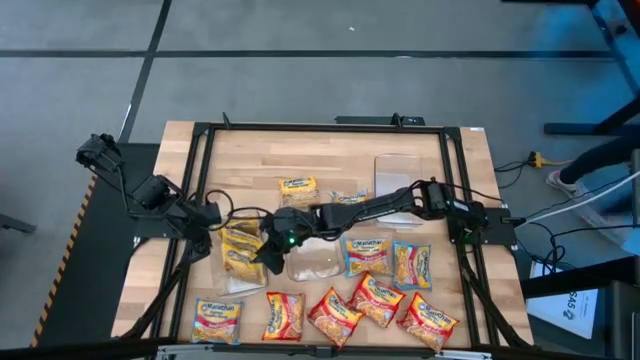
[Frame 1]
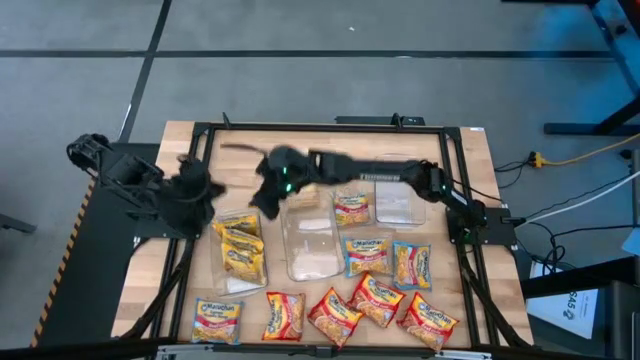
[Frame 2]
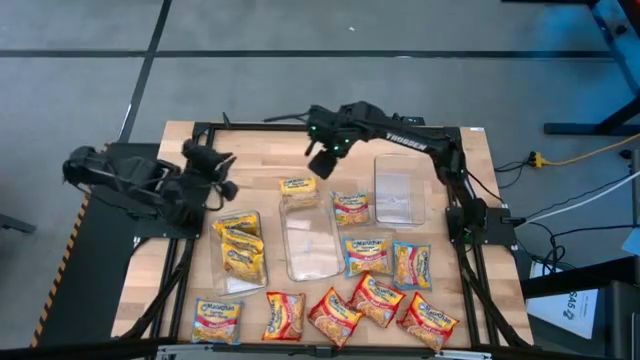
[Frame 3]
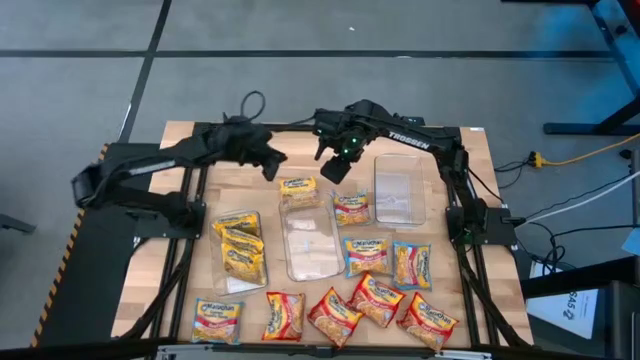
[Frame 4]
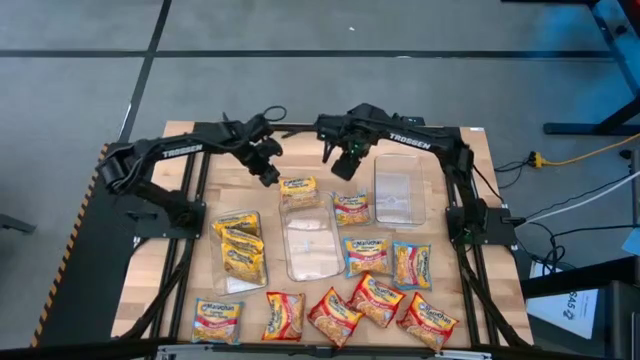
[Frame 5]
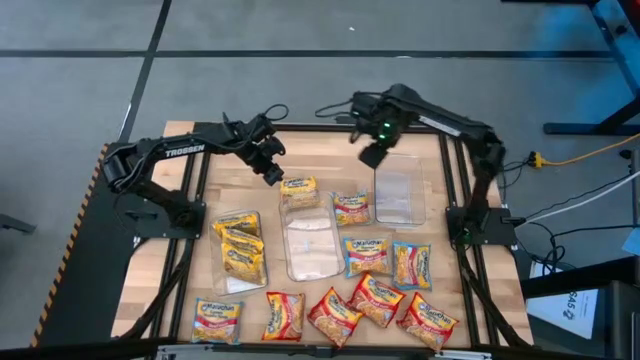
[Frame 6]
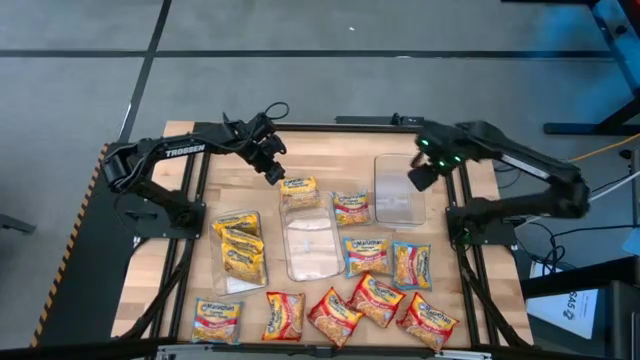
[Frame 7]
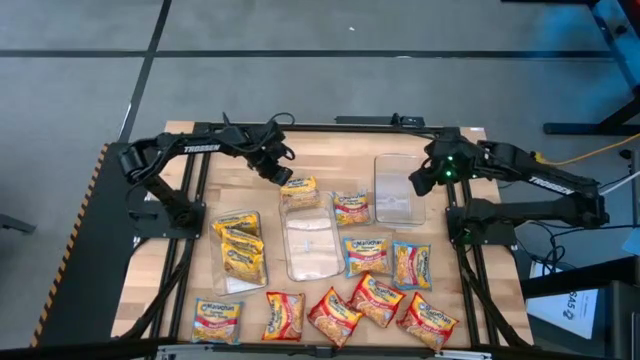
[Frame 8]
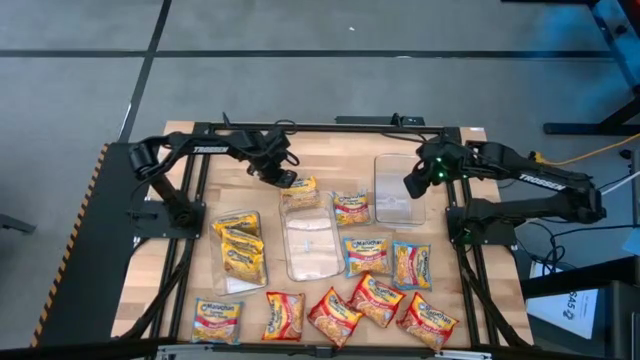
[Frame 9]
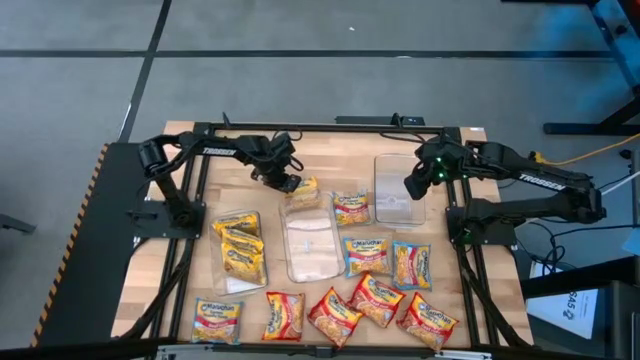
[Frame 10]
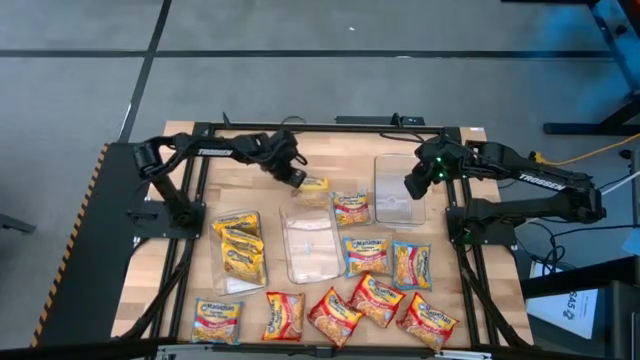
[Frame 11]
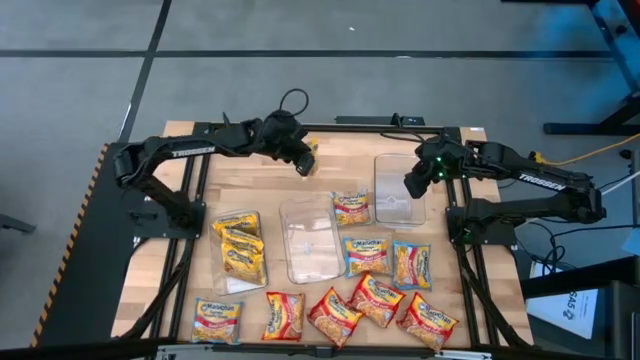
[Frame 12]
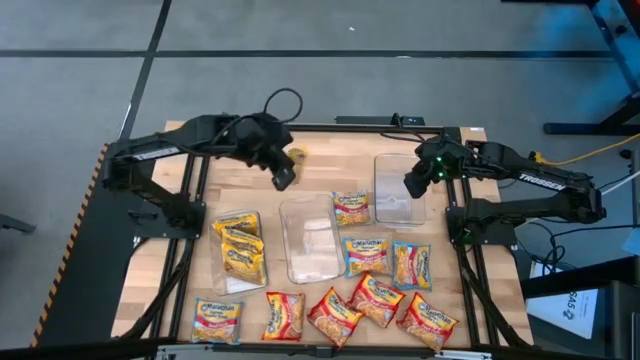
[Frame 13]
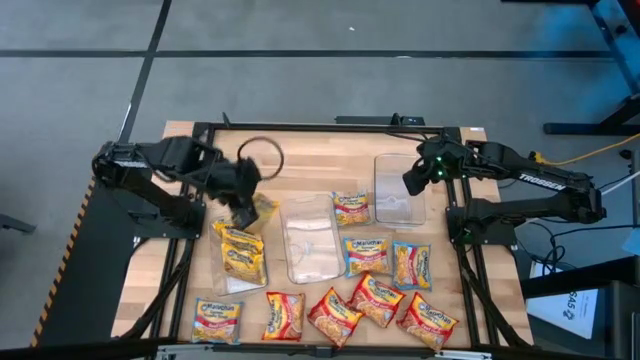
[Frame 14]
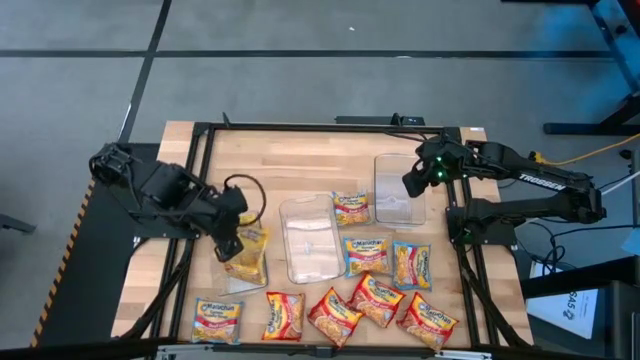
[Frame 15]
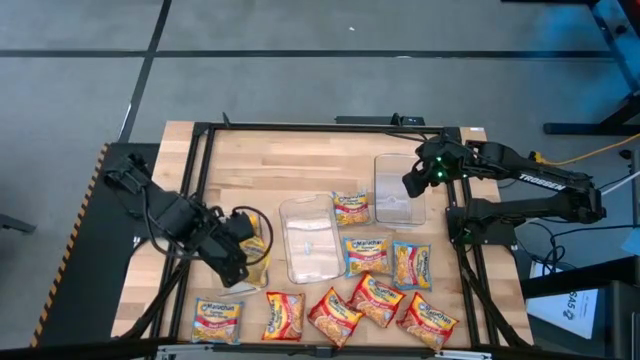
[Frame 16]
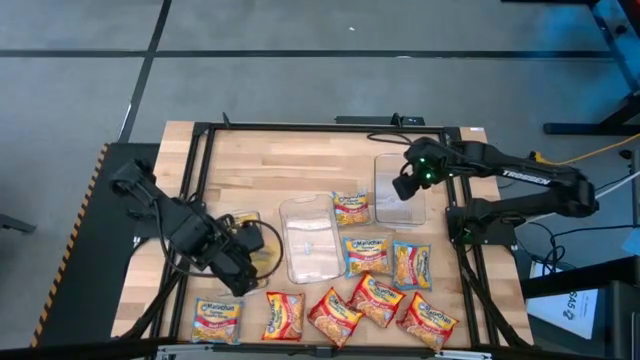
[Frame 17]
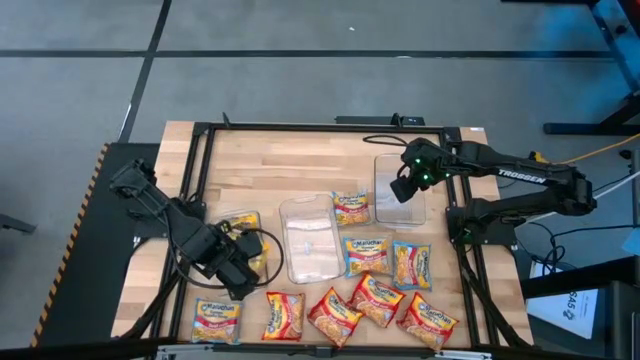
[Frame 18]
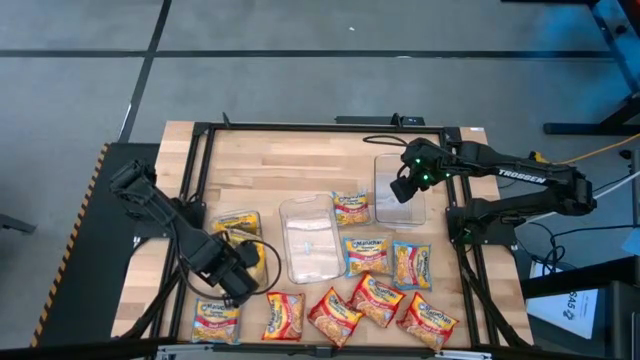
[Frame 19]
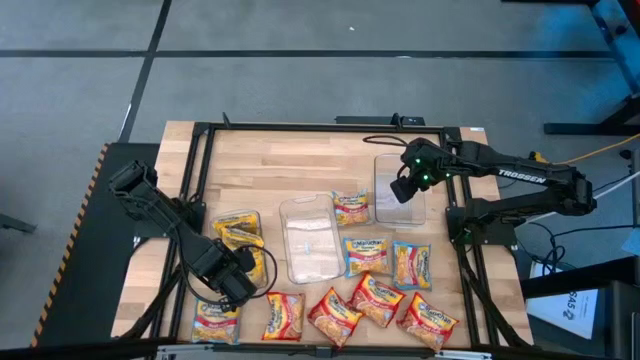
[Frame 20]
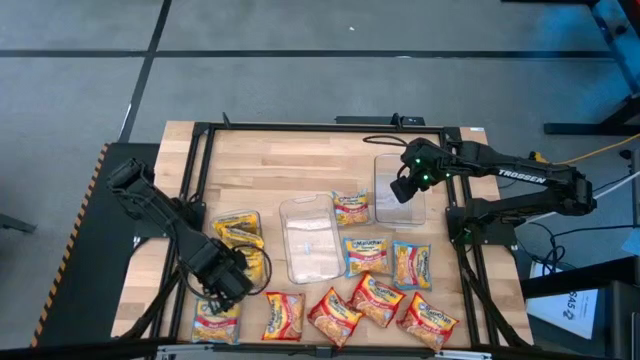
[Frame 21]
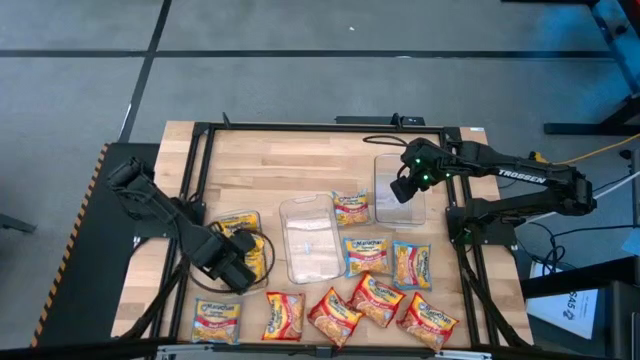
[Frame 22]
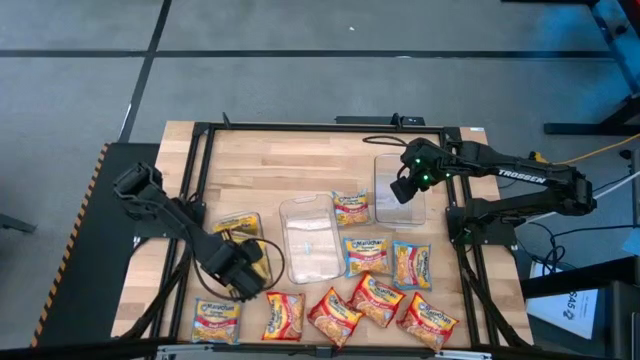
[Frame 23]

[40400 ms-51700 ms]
Task: Sort Maruchan noodles
Put the yellow noodle pack into the left transparent bin

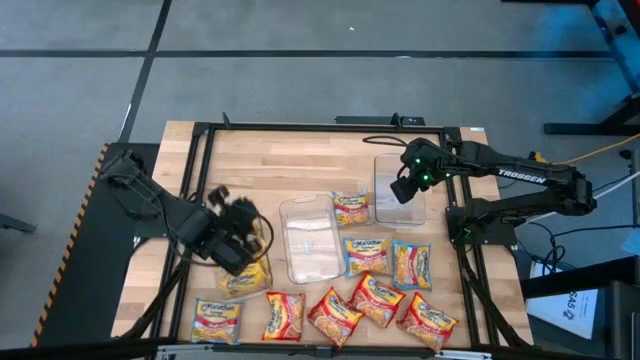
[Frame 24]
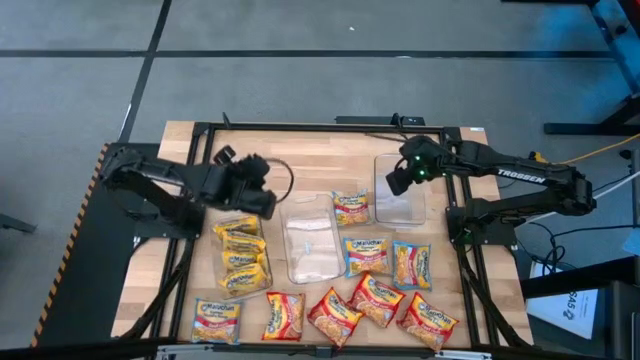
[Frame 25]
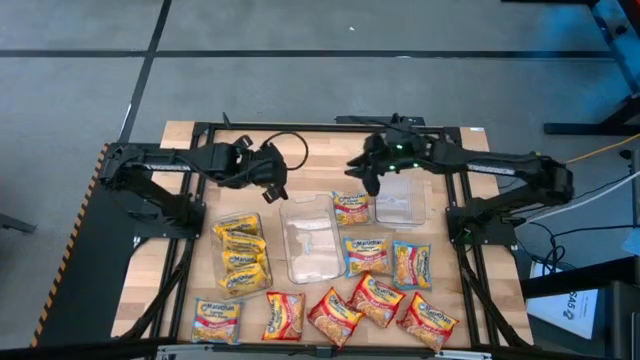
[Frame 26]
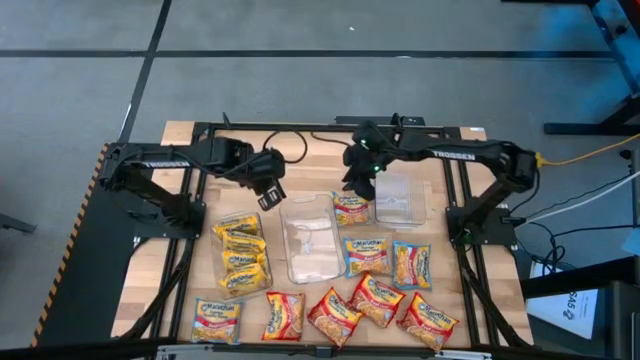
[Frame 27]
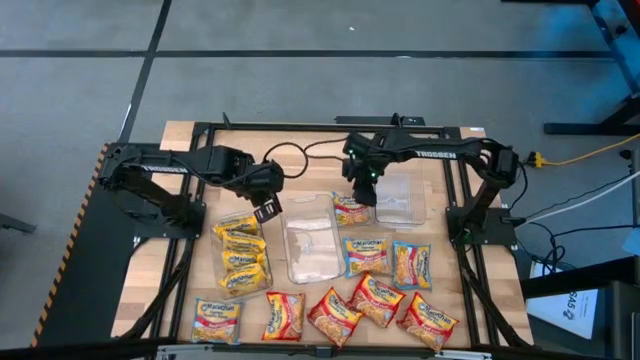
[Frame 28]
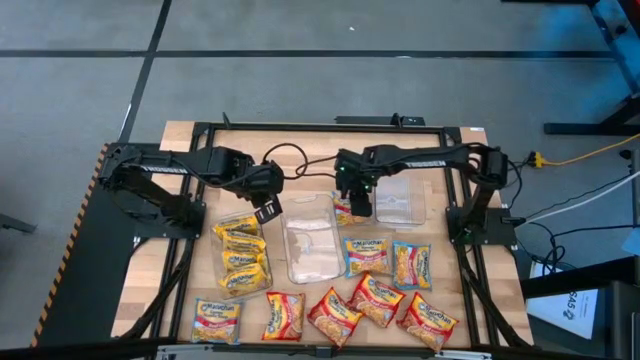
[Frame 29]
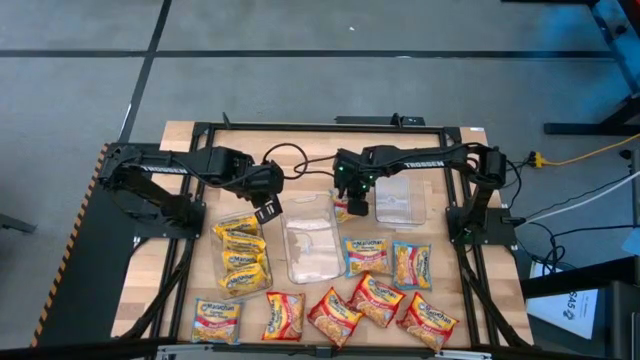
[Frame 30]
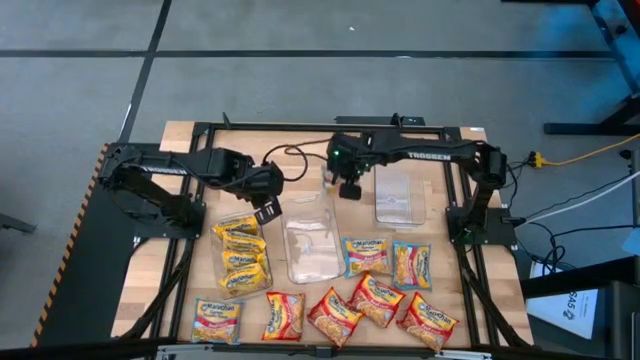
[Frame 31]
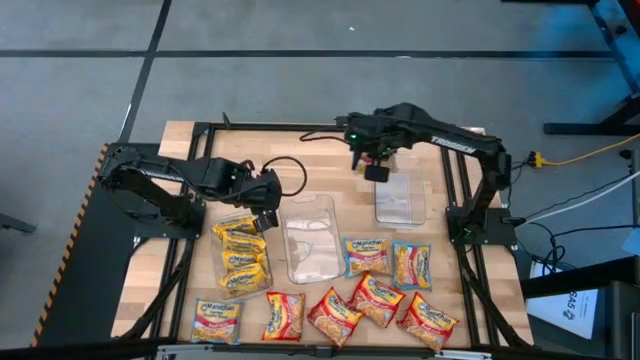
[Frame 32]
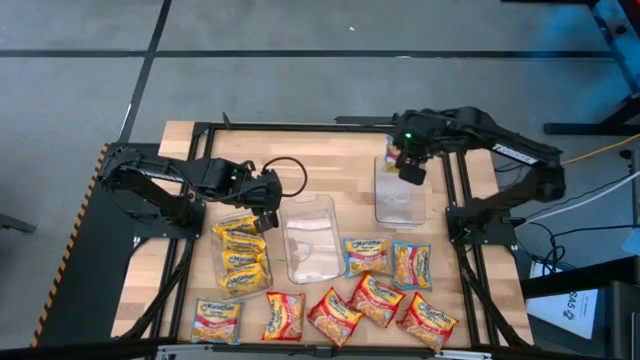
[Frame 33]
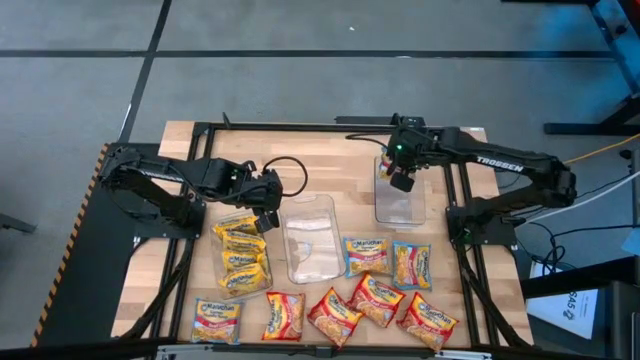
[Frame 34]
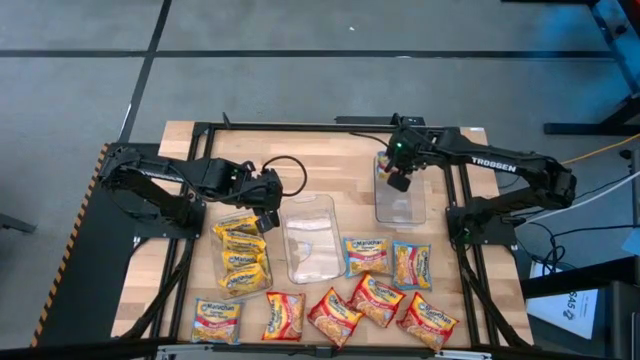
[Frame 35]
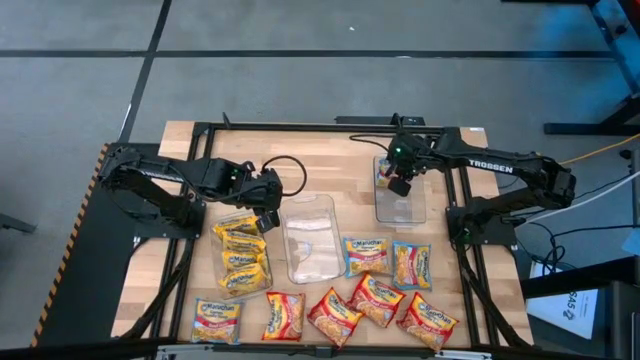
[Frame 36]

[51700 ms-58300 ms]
Put the blue noodle pack into the right transparent bin

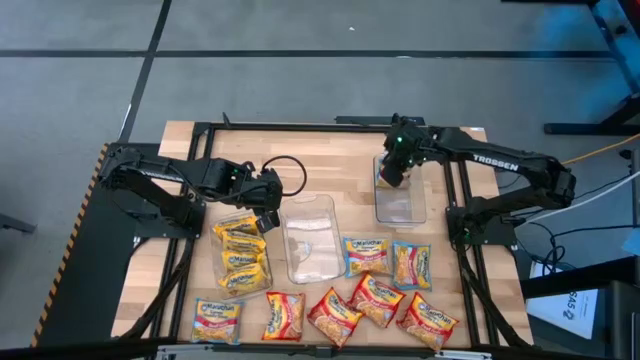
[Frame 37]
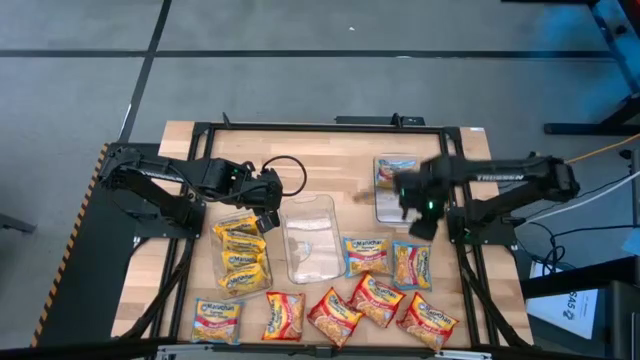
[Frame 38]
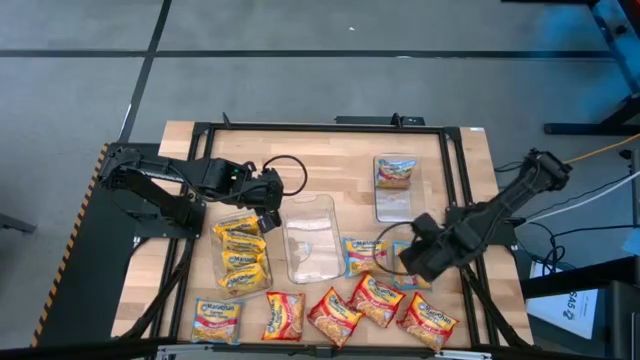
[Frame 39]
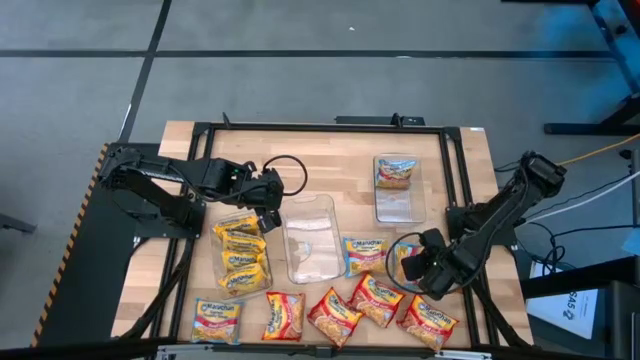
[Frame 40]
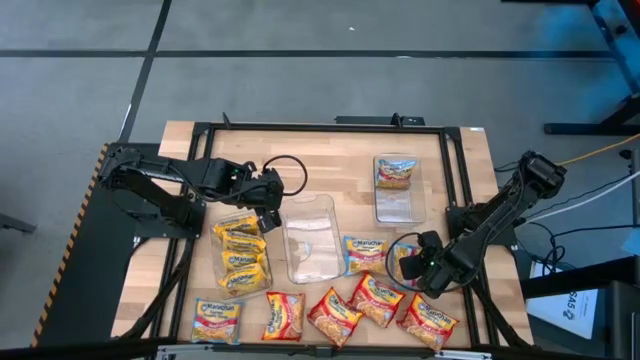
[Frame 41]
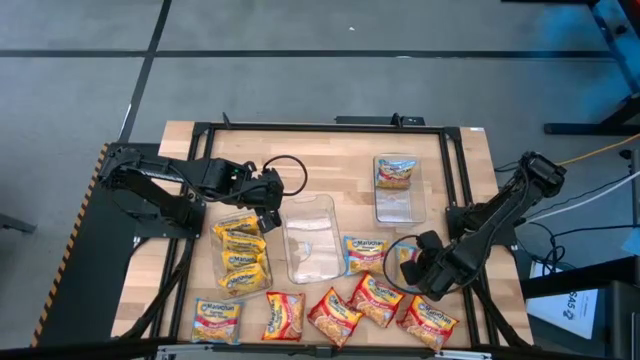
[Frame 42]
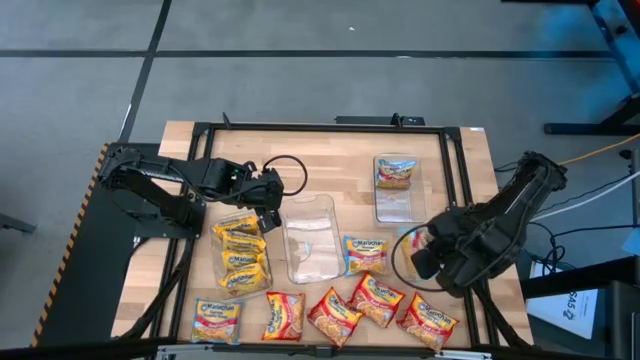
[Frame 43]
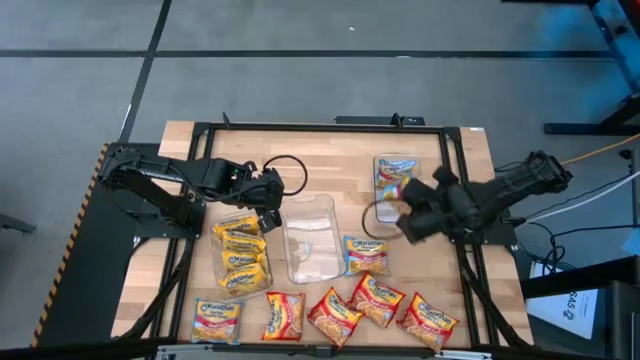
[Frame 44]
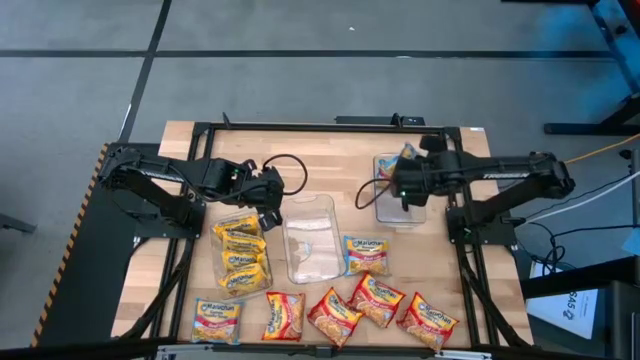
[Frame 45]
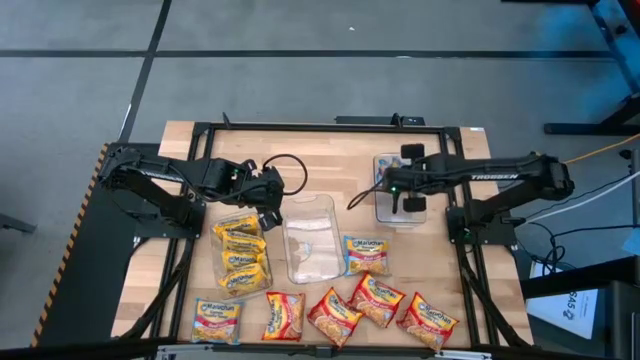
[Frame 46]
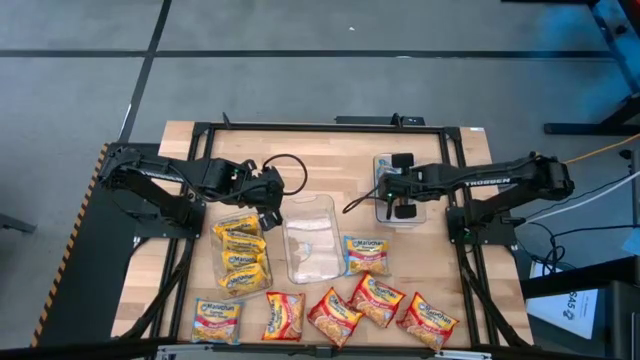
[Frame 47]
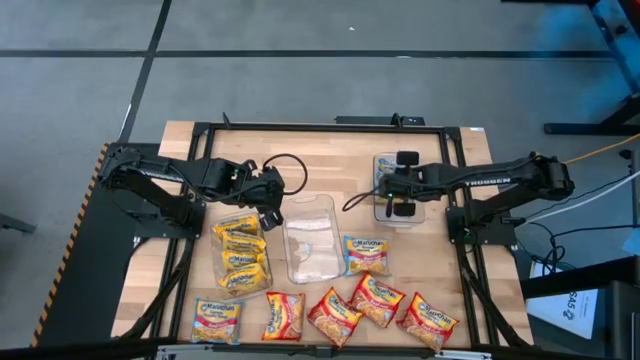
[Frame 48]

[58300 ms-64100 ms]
Put the blue noodle pack into the right transparent bin
